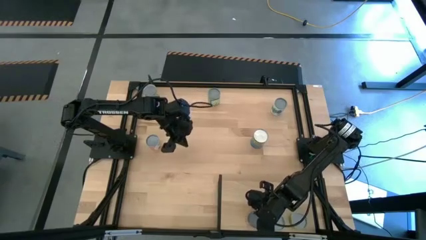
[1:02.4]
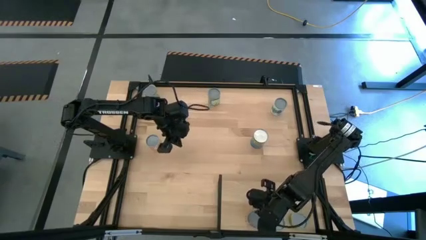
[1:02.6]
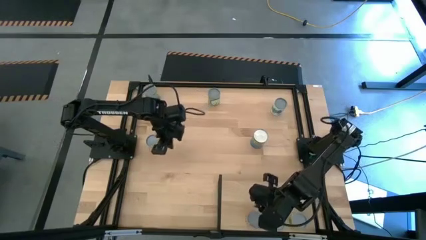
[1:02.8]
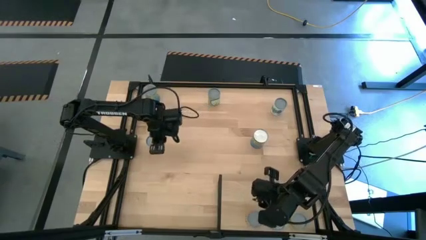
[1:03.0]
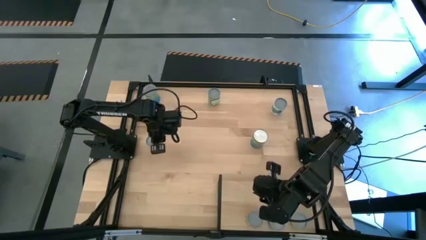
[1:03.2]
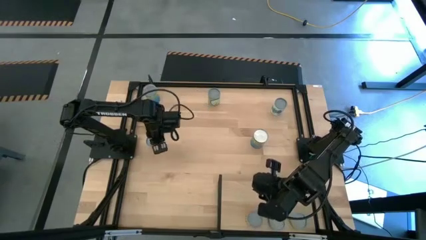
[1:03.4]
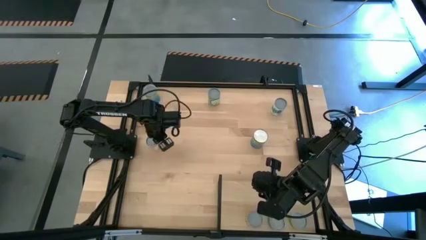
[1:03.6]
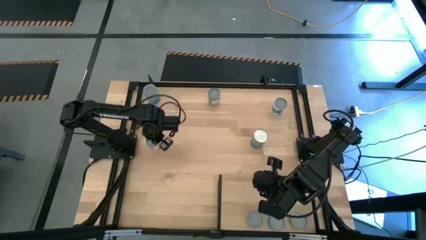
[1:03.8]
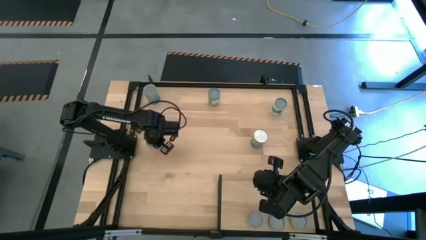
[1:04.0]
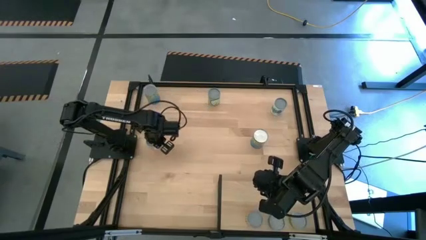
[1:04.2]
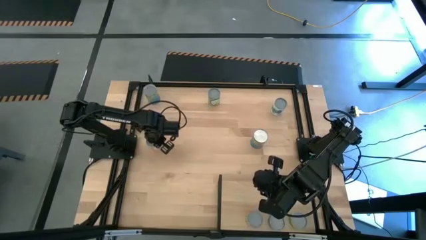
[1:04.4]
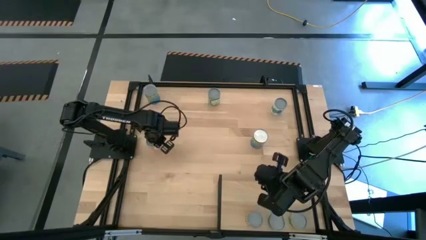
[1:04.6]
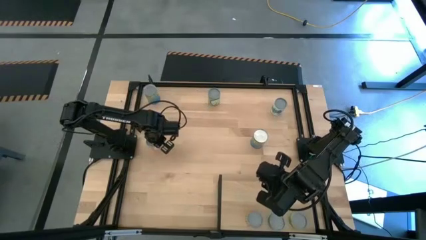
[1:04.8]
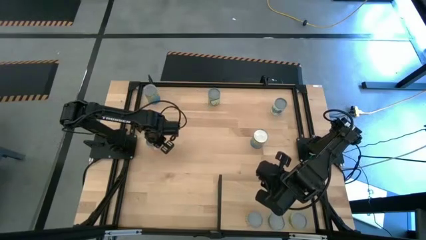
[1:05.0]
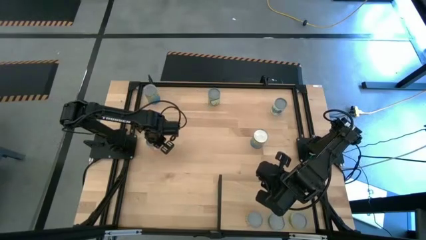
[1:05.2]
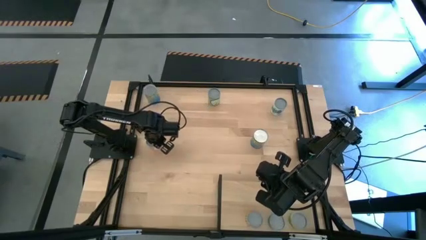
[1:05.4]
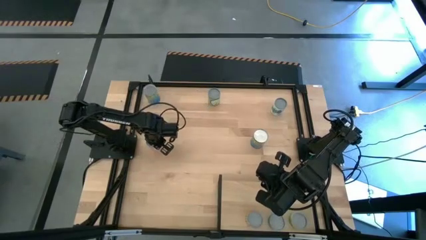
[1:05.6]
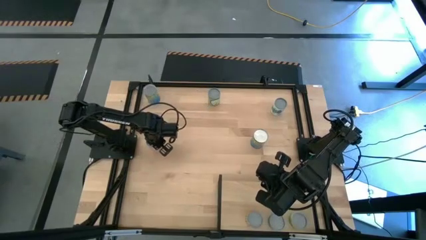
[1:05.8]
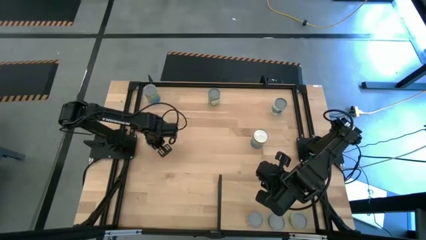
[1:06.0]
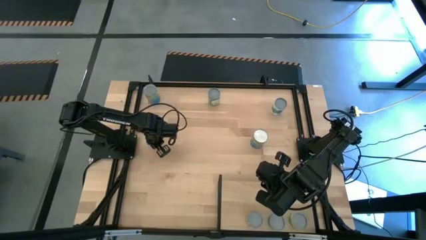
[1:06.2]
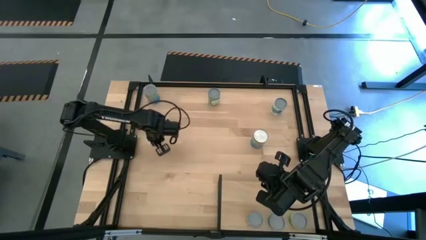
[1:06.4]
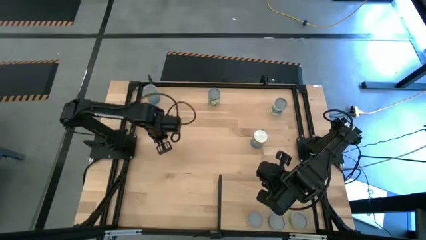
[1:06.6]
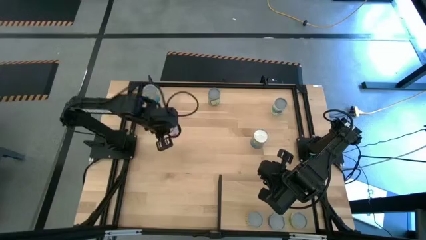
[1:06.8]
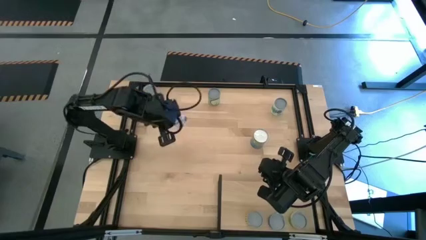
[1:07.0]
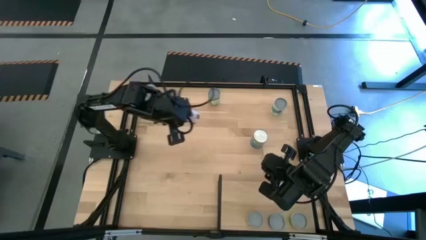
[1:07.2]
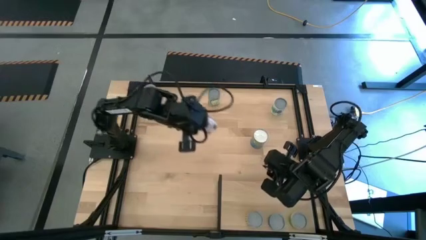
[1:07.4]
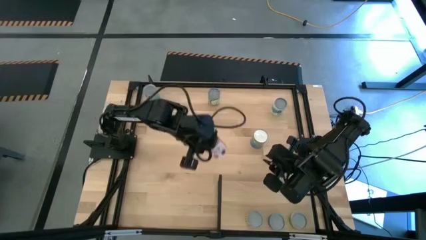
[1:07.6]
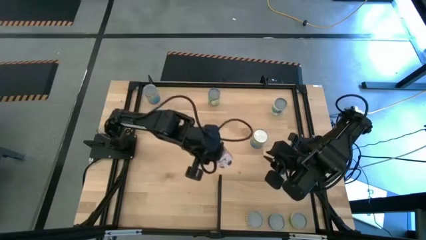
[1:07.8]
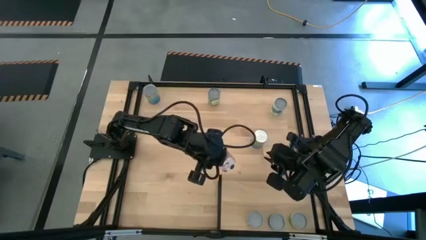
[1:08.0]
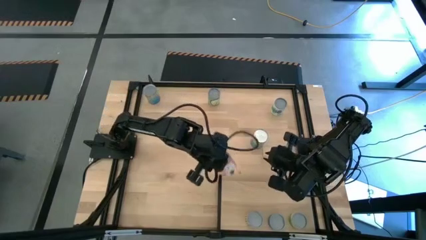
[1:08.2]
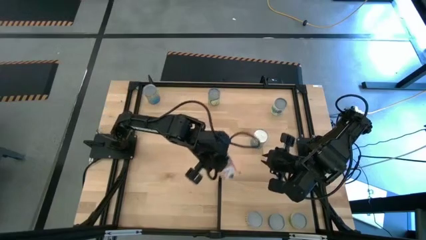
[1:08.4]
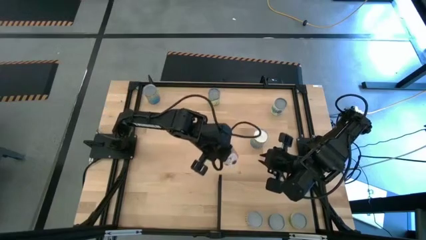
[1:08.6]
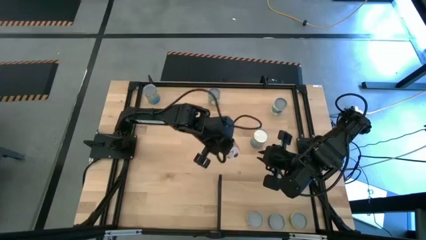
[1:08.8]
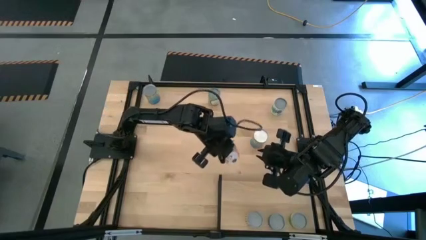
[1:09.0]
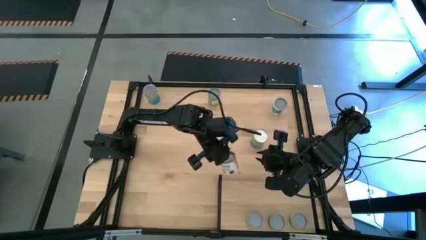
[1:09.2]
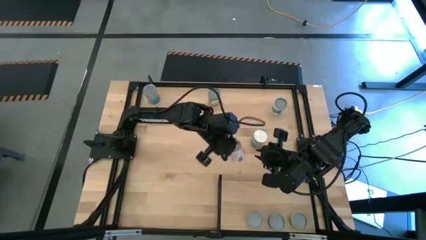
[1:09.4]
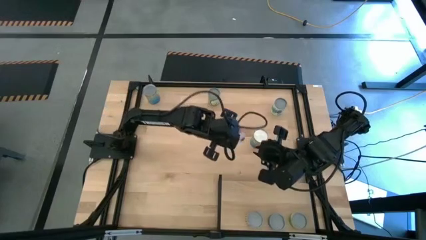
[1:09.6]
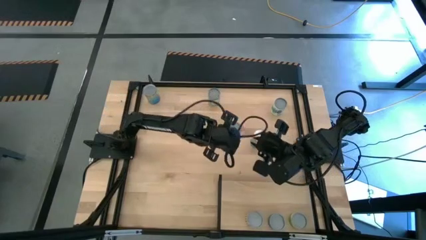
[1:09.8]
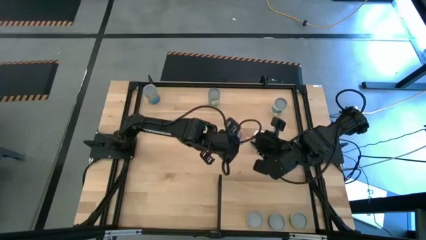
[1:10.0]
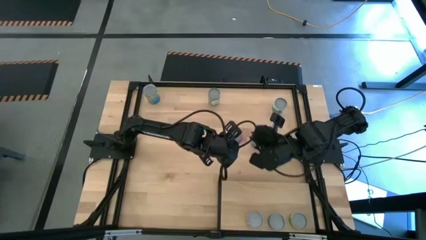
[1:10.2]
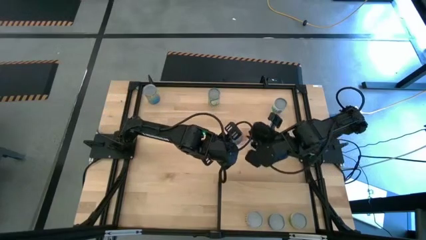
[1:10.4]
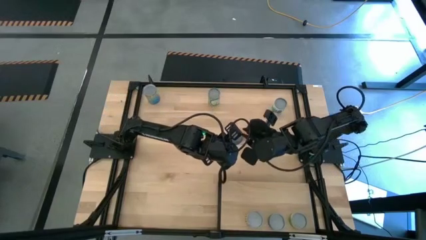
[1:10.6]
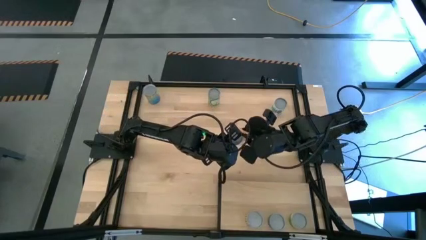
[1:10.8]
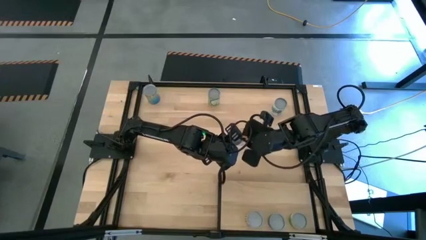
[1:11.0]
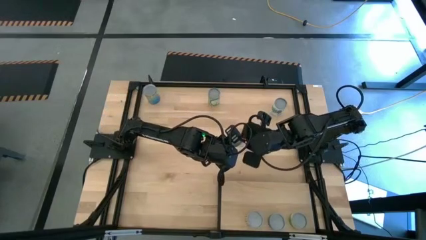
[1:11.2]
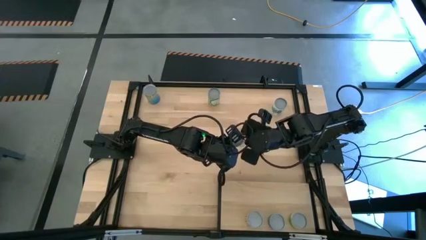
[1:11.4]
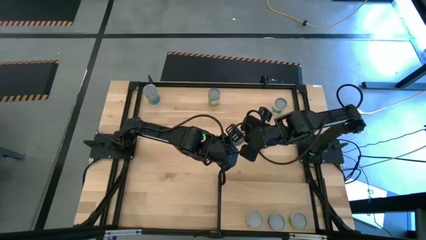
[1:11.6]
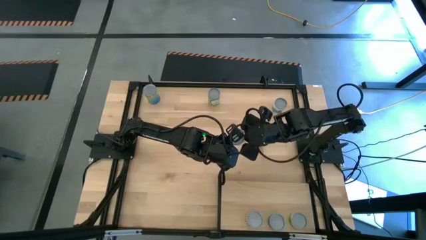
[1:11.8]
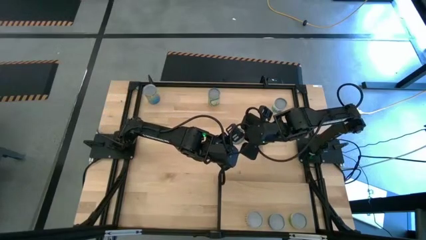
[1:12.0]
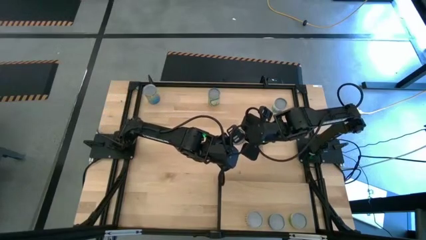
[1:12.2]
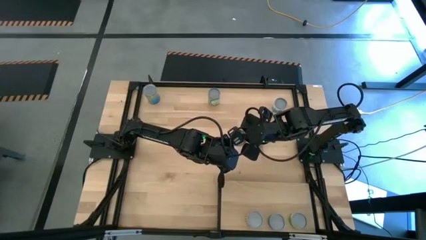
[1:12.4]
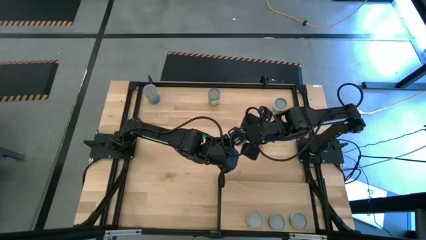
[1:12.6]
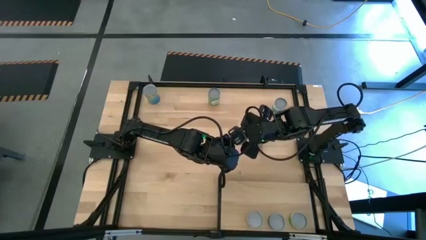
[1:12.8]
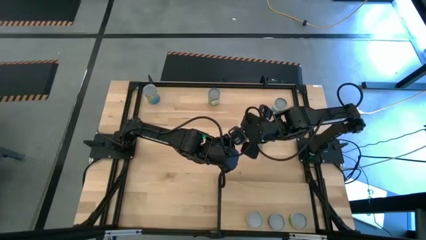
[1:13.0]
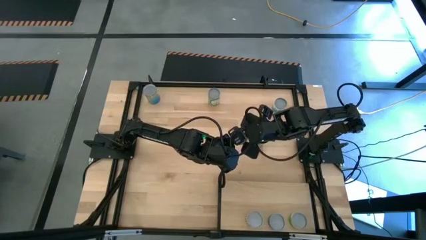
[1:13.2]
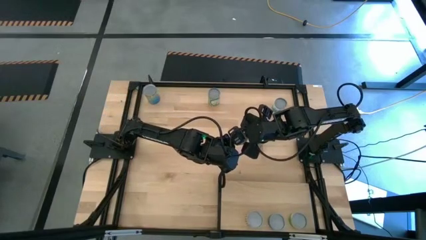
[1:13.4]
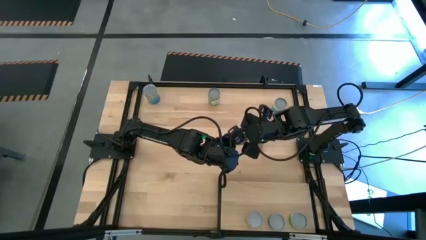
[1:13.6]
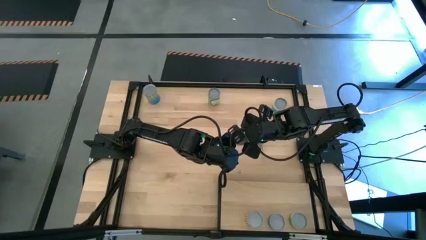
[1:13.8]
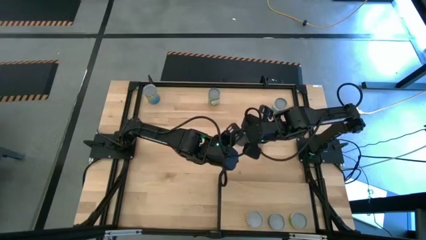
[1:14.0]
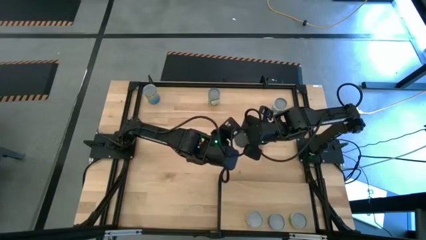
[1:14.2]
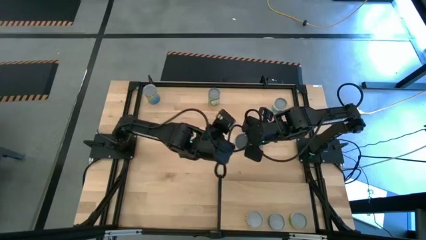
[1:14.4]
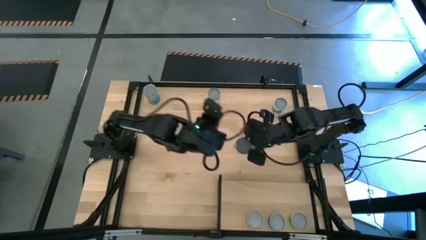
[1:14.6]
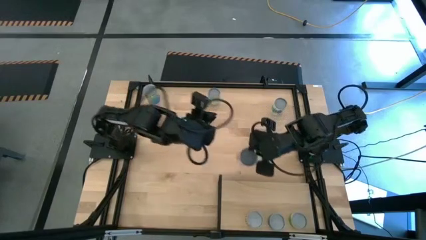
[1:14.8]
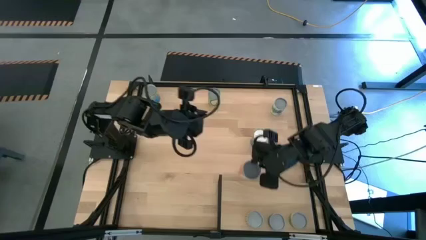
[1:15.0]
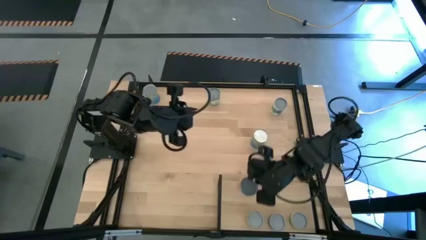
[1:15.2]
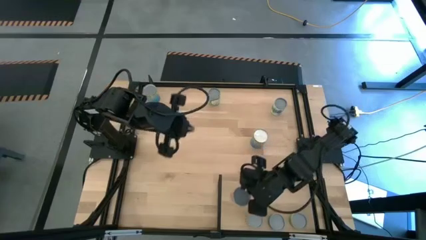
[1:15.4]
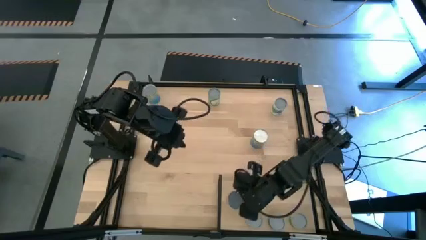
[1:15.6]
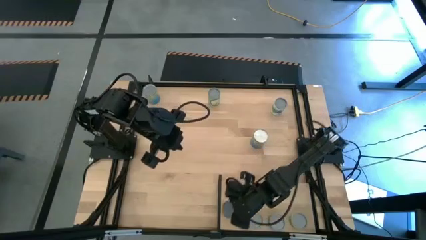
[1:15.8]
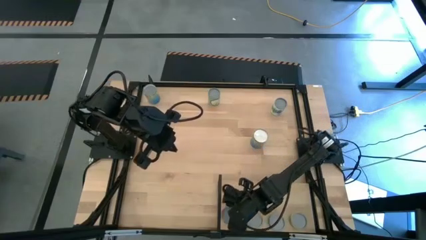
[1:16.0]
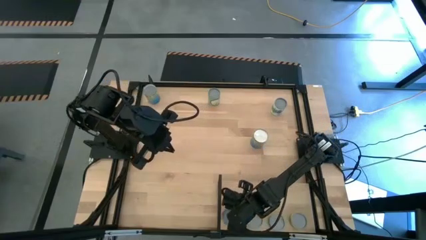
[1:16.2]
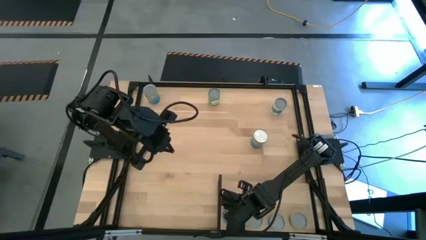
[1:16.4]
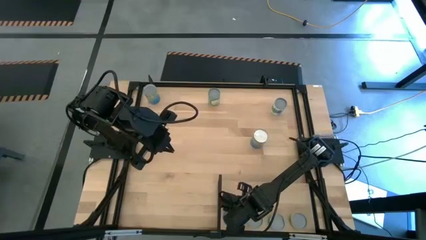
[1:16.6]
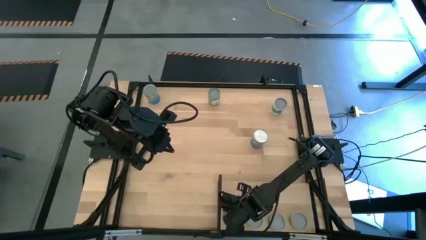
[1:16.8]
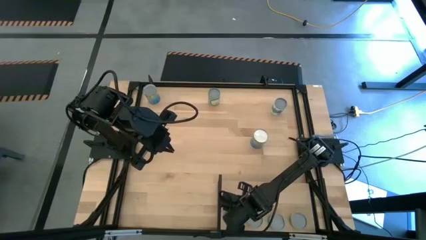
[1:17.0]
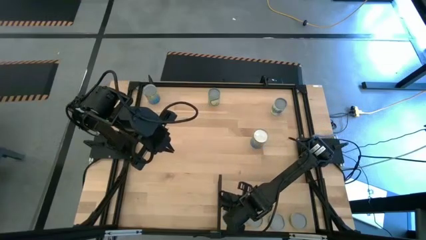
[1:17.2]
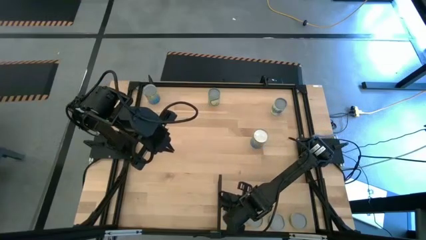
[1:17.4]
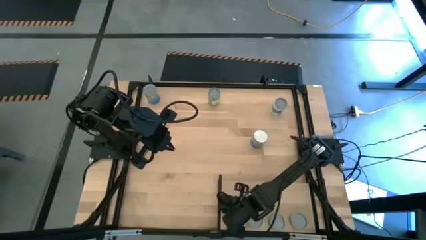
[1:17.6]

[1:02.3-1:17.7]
Task: Pick and place cans onto a shelf
Put the canned sauce on the shelf

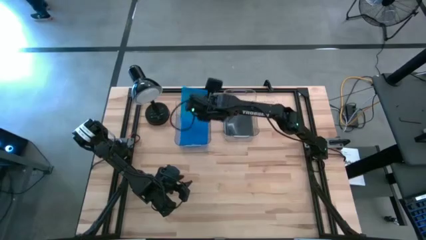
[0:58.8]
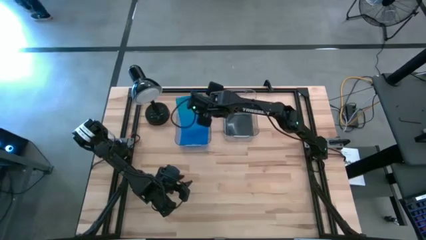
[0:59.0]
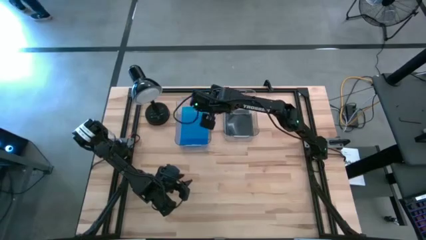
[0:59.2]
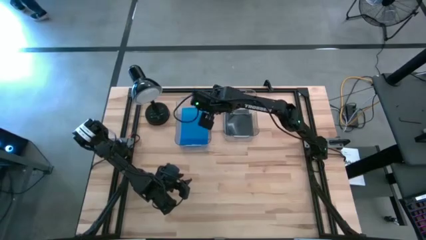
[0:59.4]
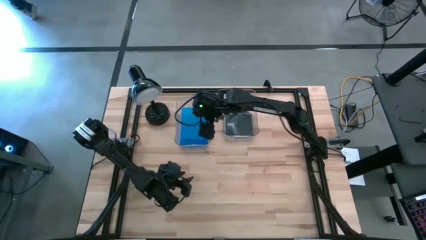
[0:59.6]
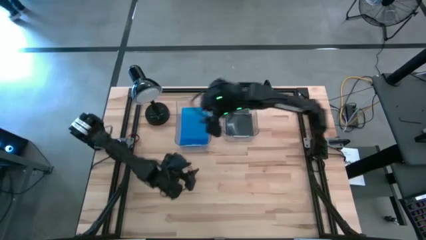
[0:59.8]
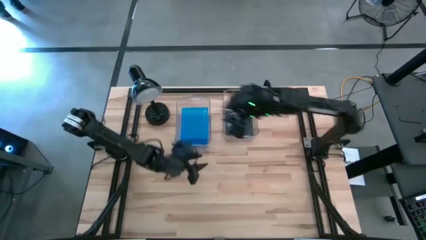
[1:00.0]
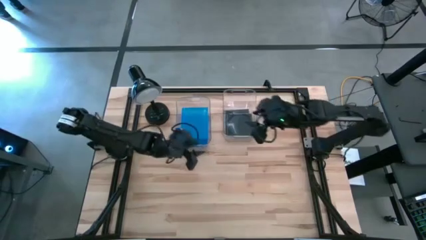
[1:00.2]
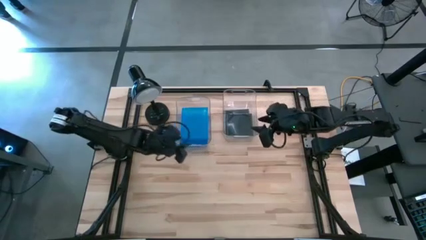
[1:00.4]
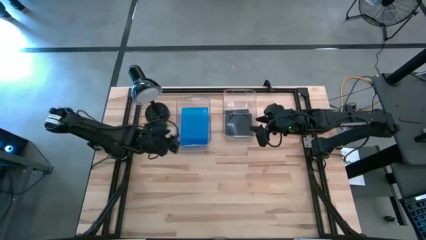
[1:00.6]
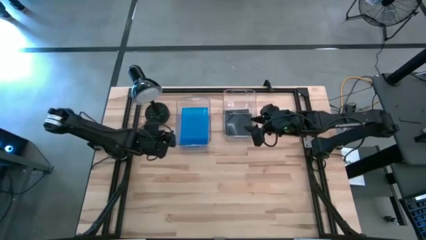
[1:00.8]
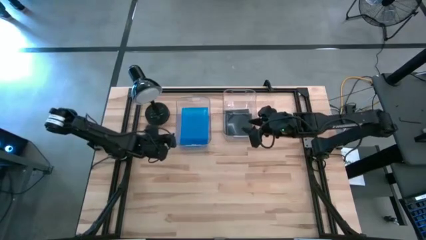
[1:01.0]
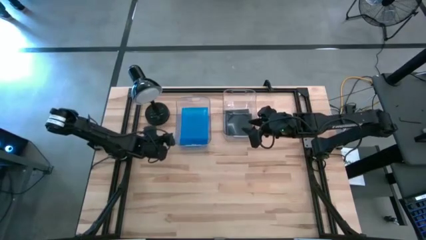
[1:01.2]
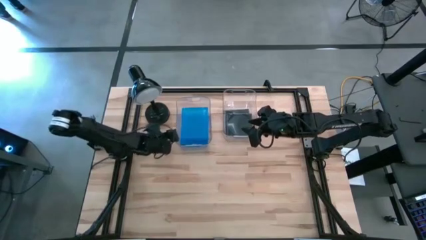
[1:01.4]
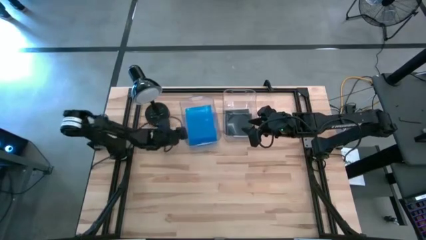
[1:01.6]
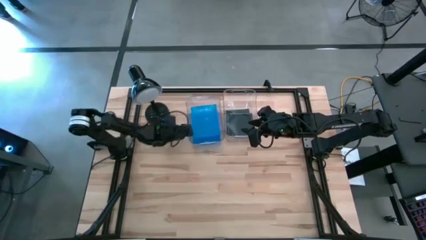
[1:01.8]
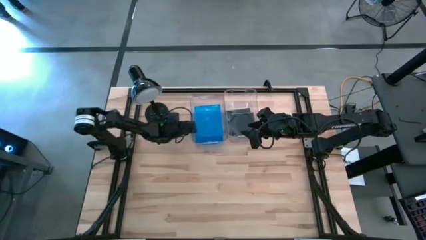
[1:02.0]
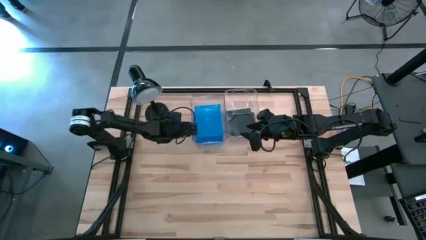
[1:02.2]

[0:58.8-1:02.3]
Task: Pick & place jewel cases by type
Adjust the left transparent bin on the table
